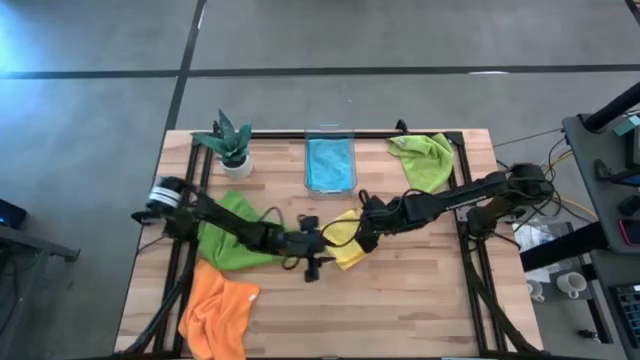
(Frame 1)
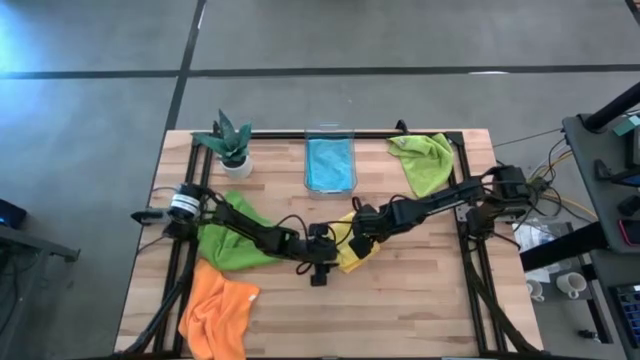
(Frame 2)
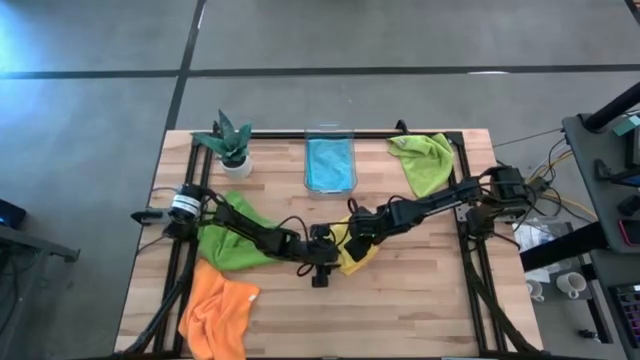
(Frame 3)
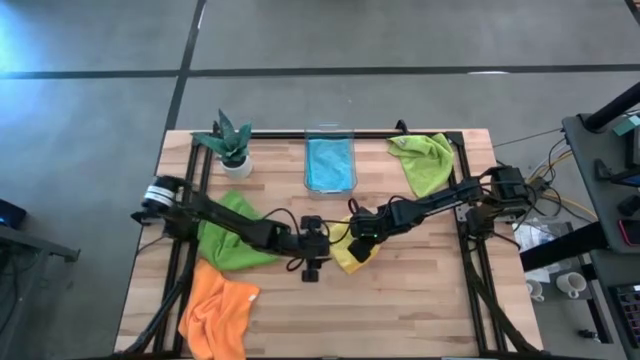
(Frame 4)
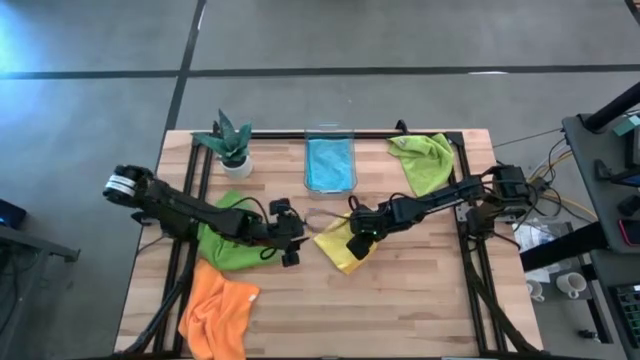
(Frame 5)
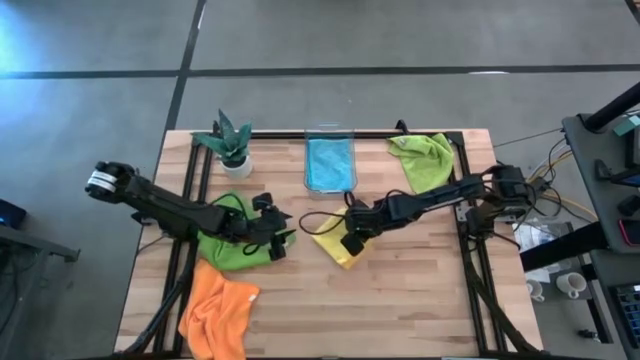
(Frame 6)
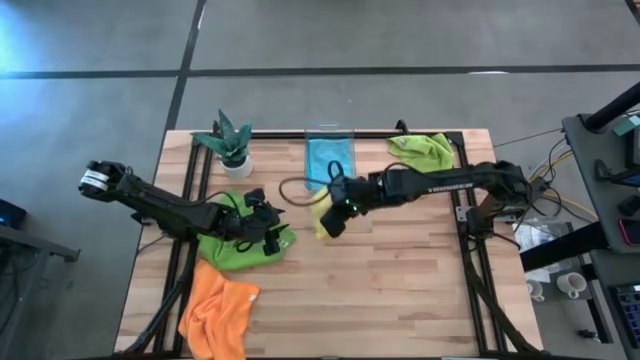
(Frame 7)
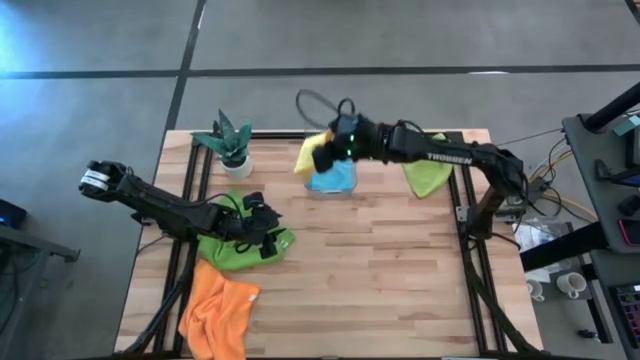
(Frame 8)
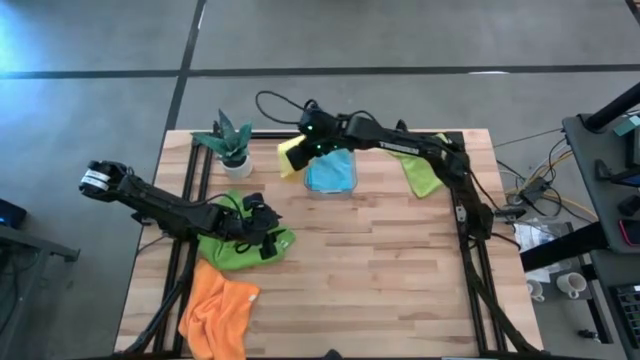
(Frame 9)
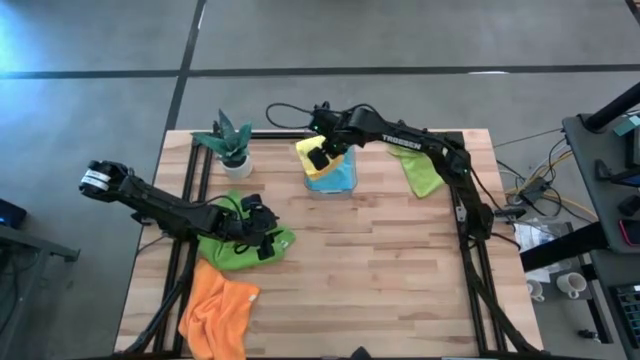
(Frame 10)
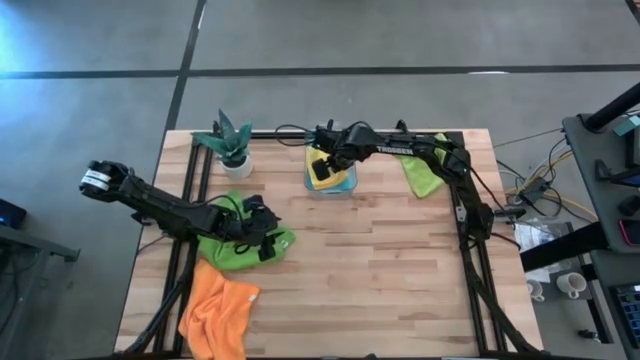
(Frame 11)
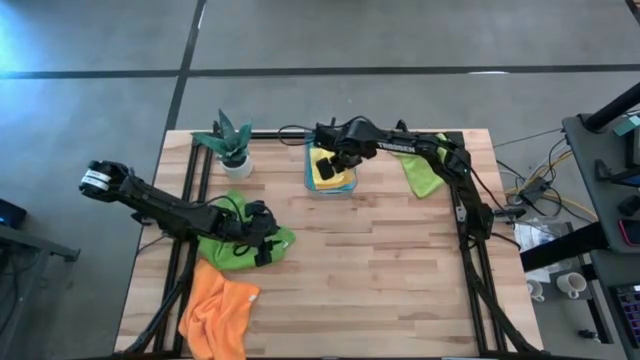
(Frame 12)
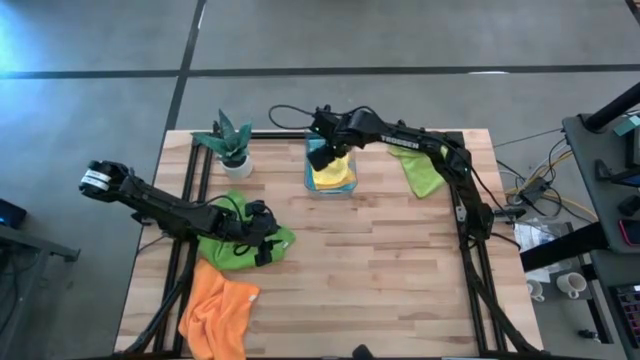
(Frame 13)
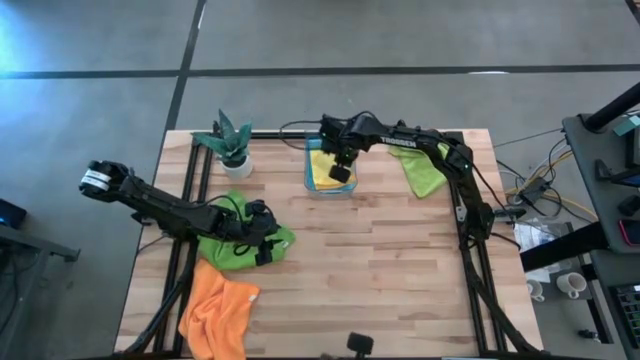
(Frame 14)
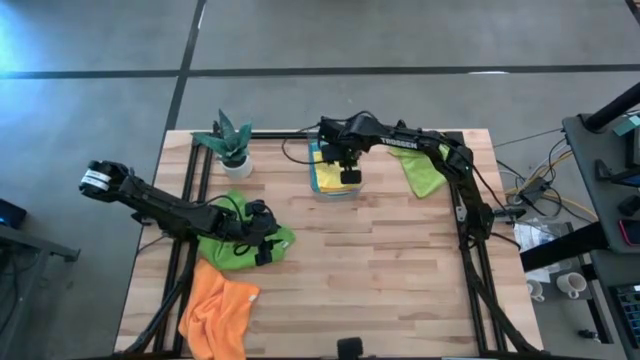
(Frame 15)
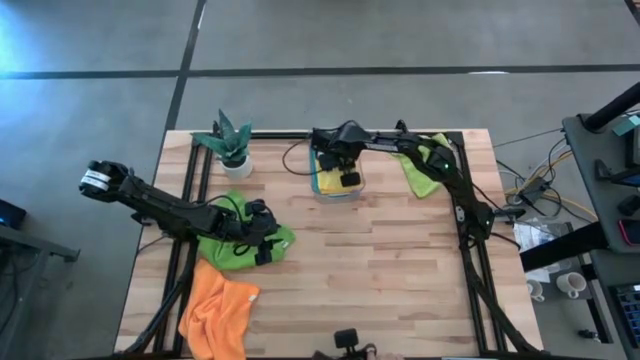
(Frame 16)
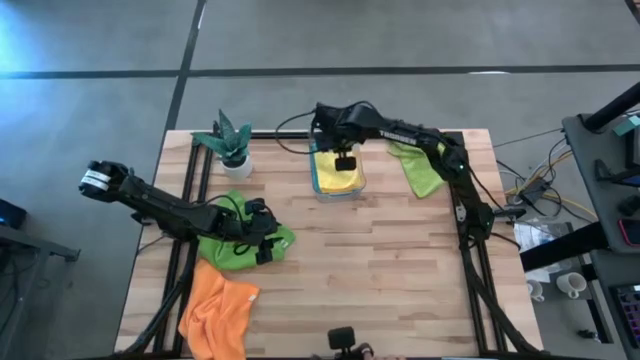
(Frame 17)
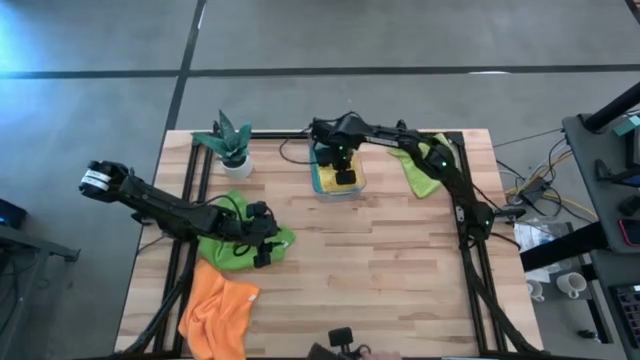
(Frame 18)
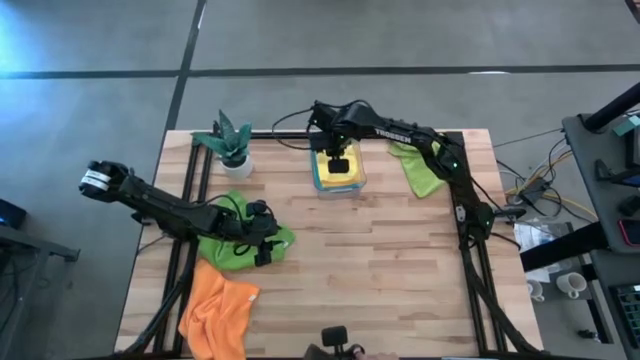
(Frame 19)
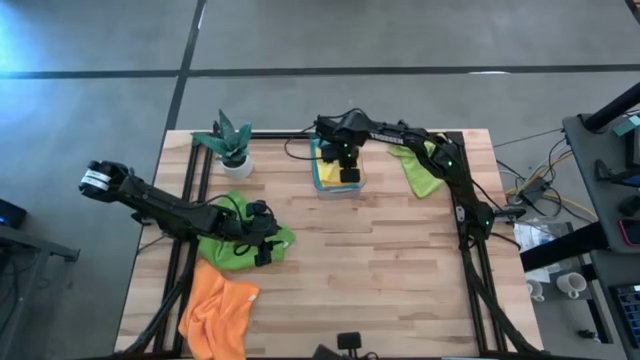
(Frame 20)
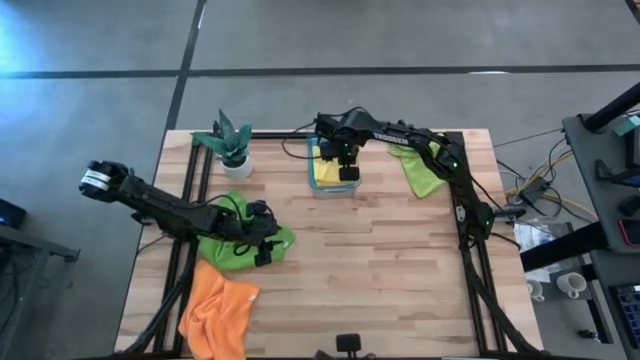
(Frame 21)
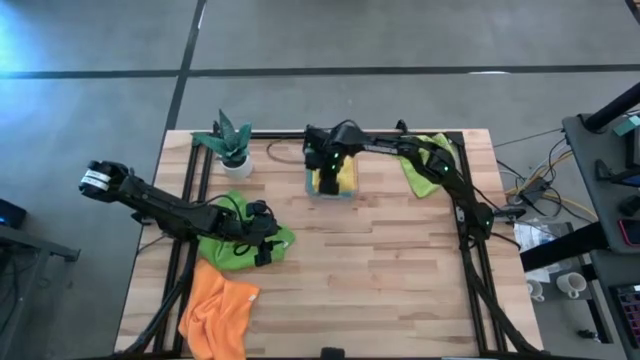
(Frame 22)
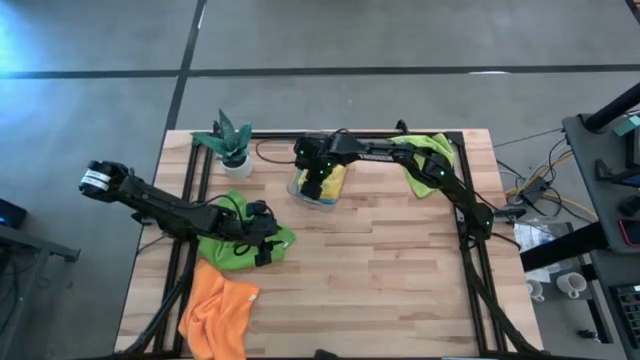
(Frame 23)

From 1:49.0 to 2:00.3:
Task: Fold microfiber towels
Stack the yellow microfiber cloth on top on the blue microfiber cloth into the bin

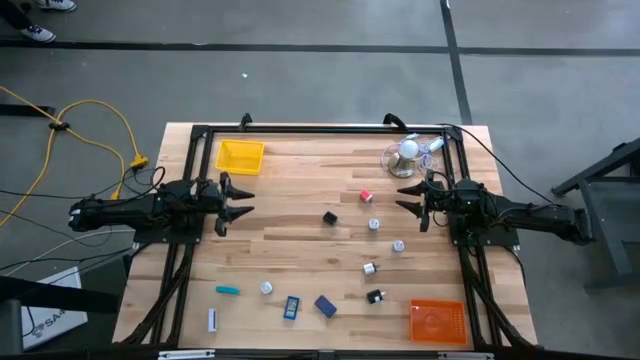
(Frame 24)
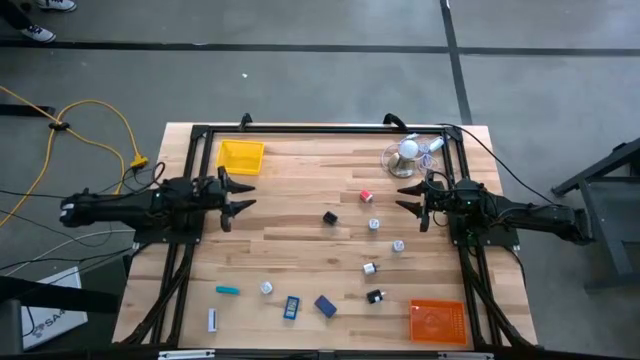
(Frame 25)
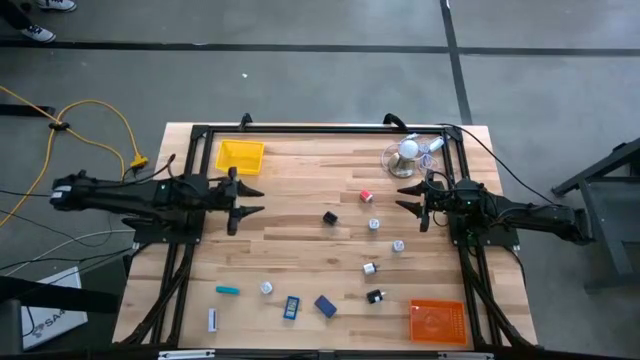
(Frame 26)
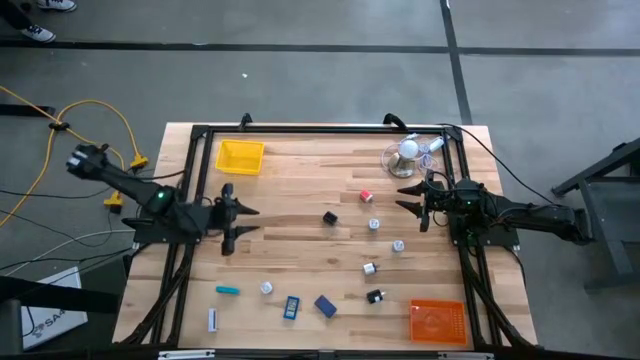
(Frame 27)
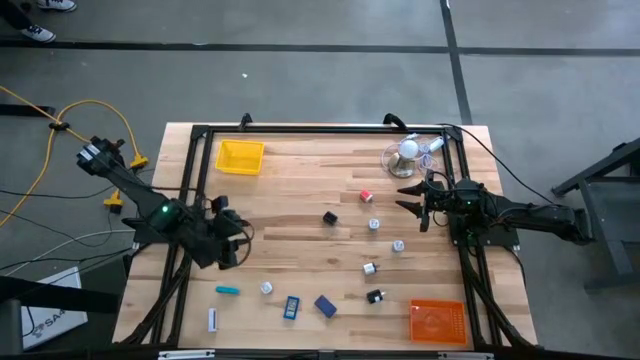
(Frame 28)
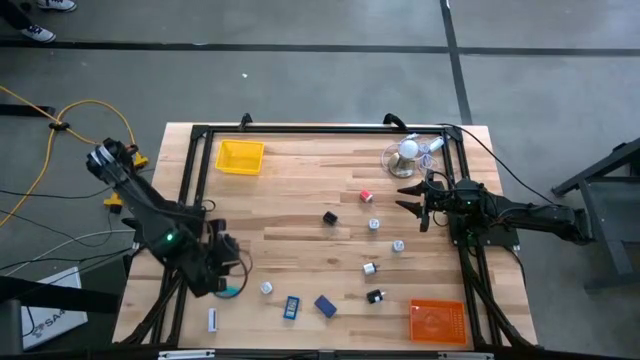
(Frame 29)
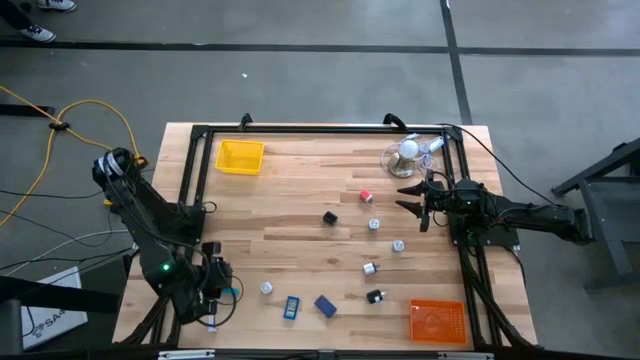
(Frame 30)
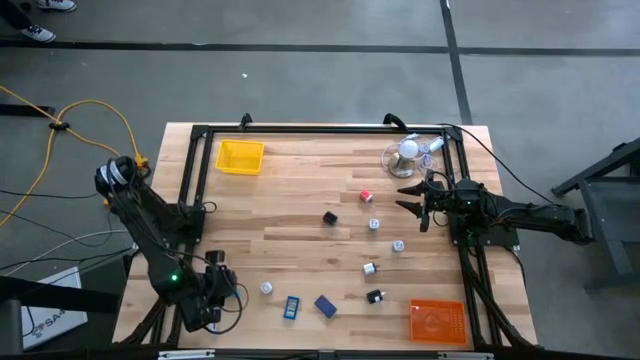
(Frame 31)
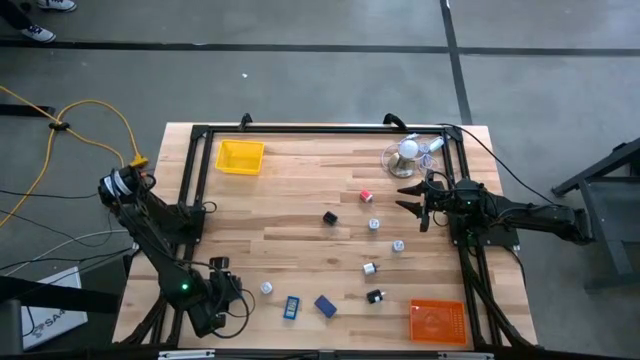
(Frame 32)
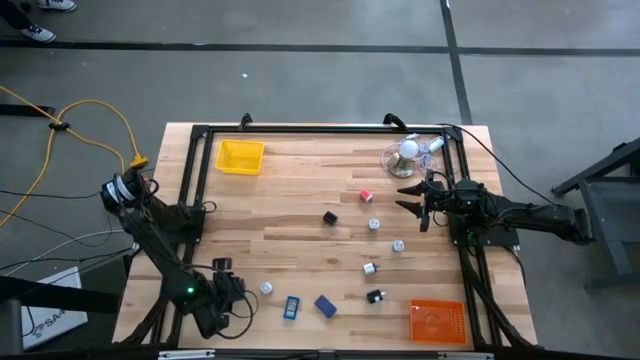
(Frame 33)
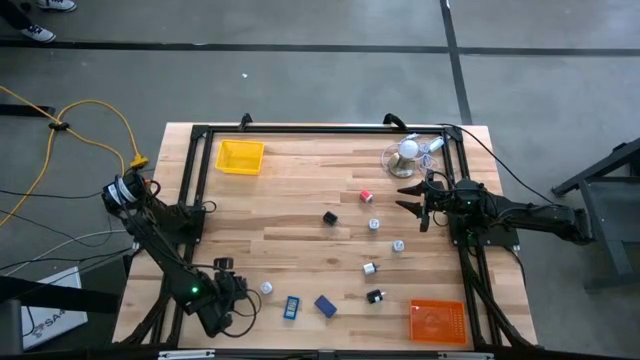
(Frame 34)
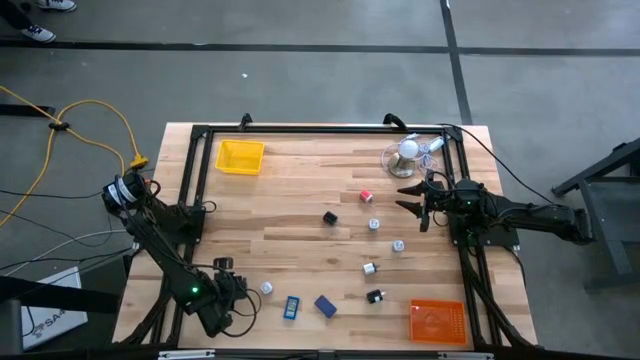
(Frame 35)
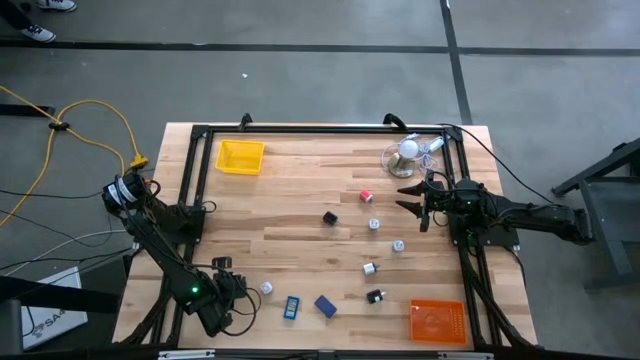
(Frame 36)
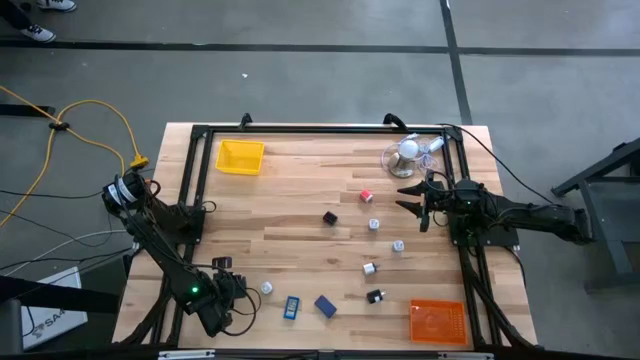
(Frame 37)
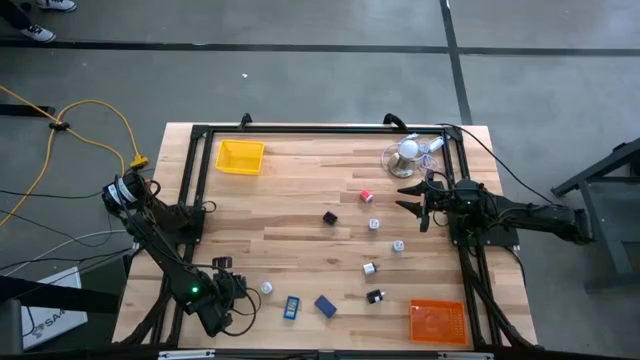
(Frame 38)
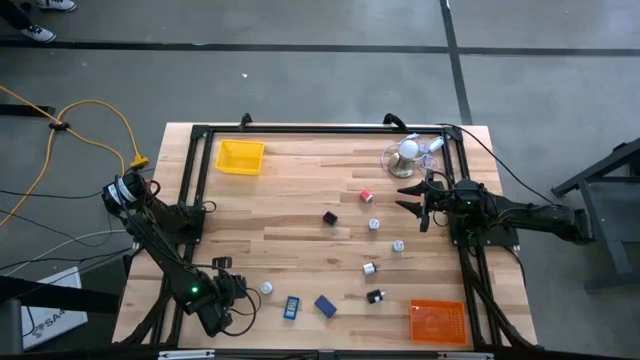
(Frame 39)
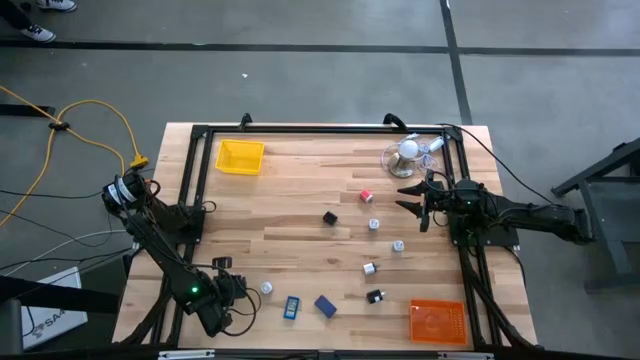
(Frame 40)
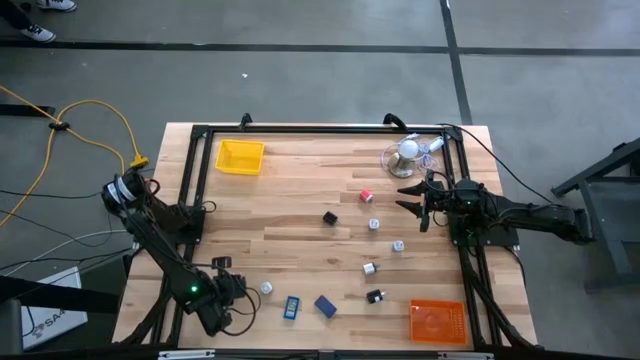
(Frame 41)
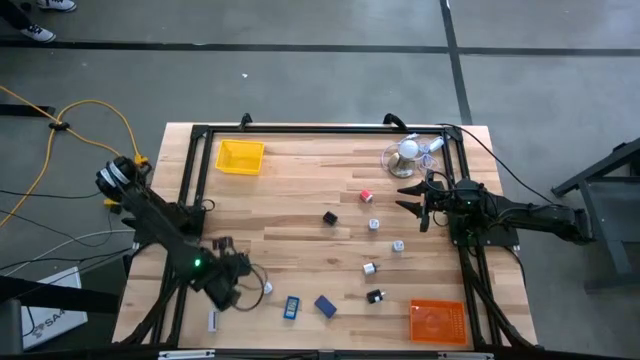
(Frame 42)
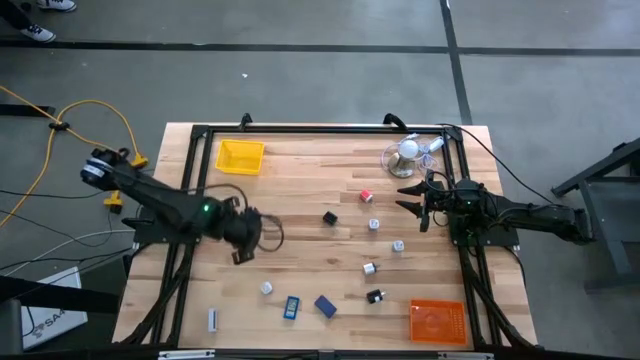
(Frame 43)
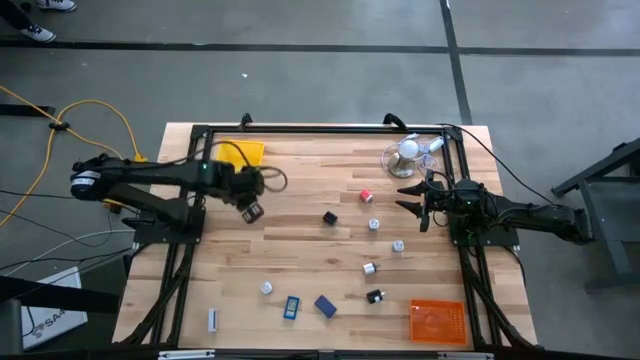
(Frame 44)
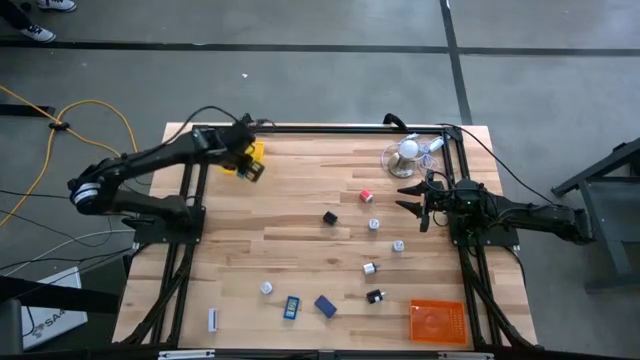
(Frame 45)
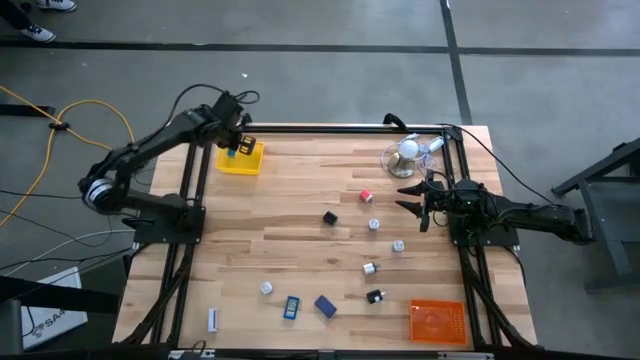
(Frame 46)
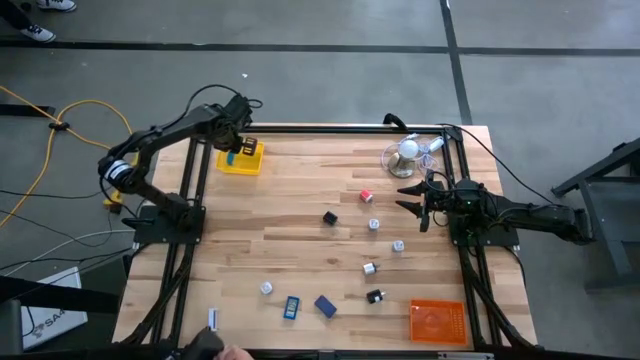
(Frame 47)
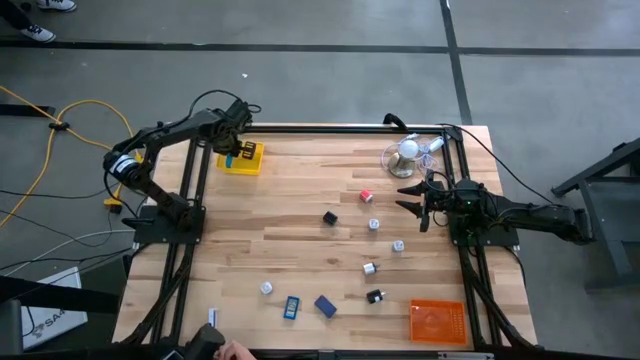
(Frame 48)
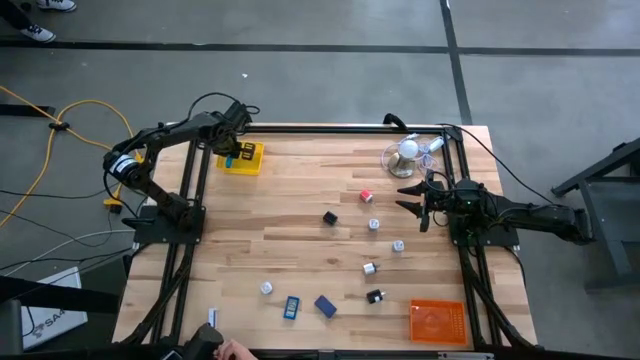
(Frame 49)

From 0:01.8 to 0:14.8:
Task: Pick & Place Office items
Put the light blue digital timer into the yellow bin
